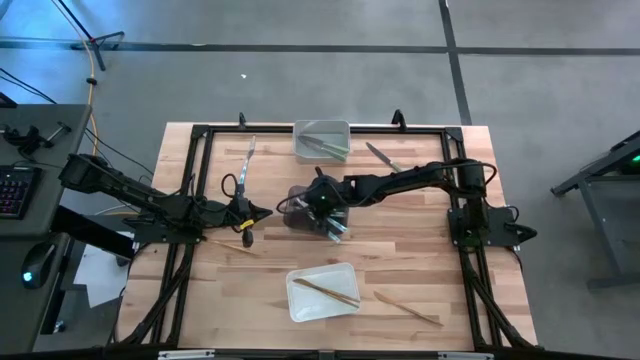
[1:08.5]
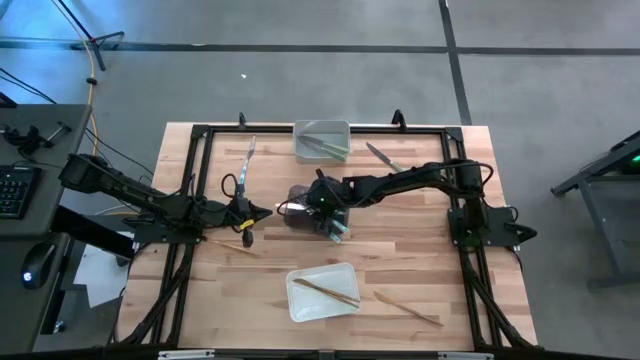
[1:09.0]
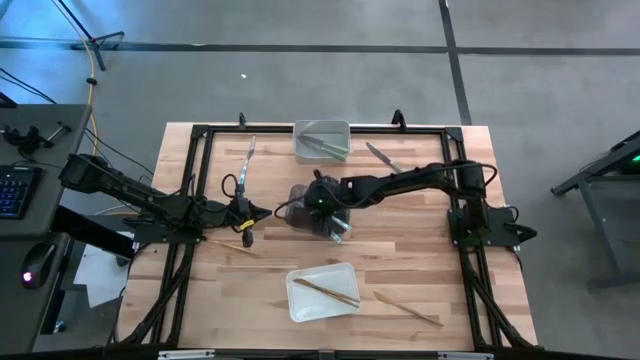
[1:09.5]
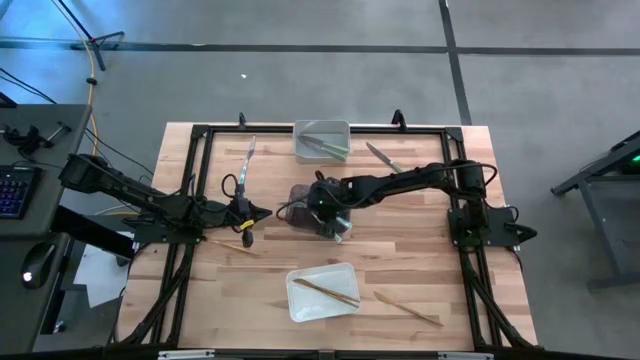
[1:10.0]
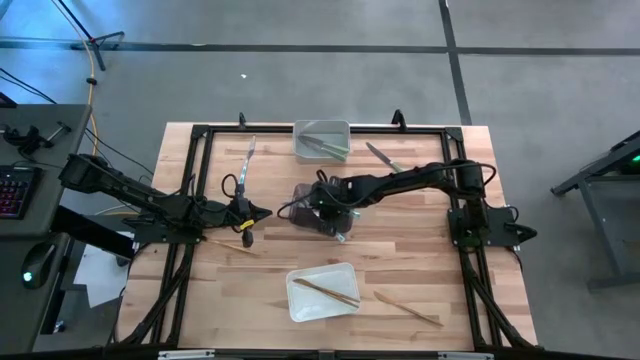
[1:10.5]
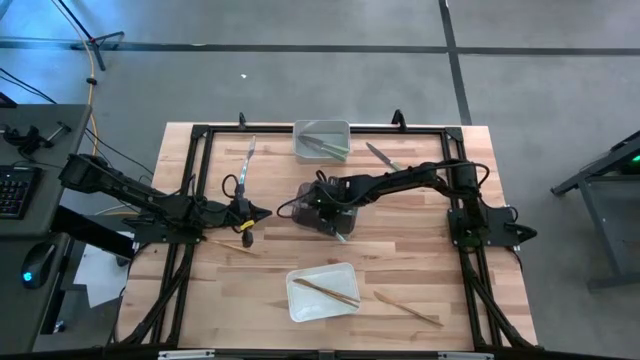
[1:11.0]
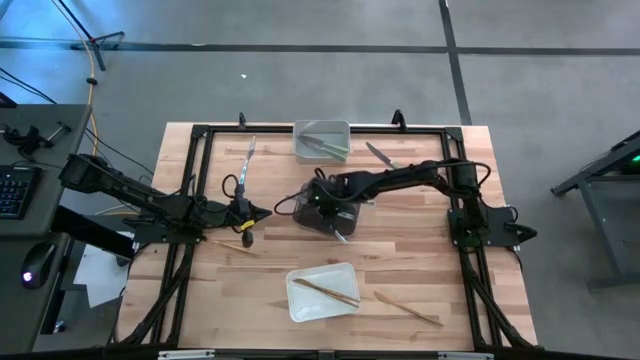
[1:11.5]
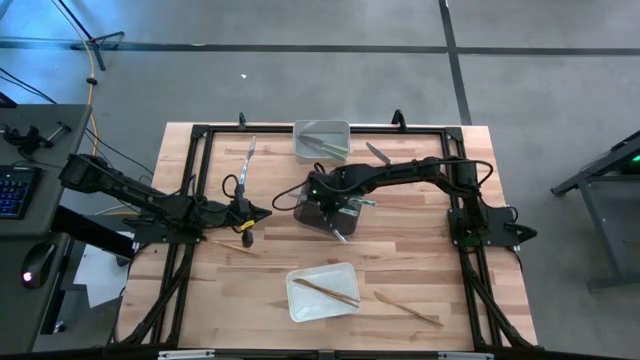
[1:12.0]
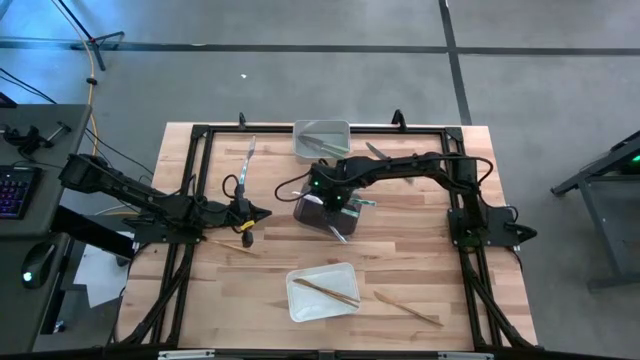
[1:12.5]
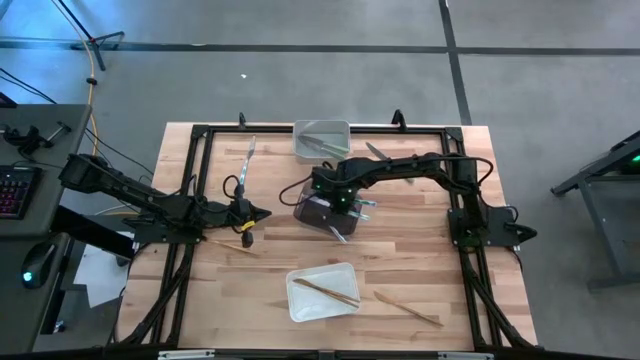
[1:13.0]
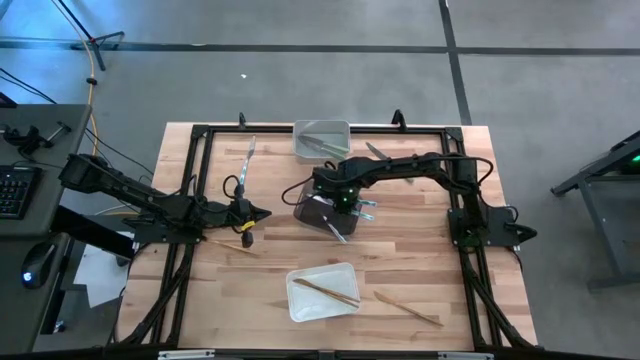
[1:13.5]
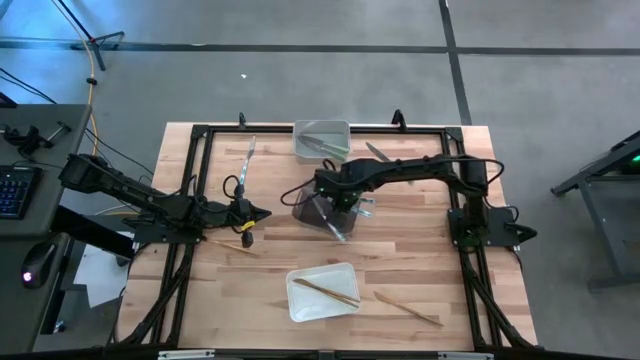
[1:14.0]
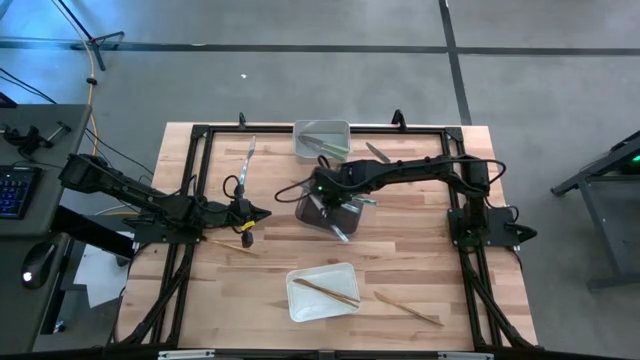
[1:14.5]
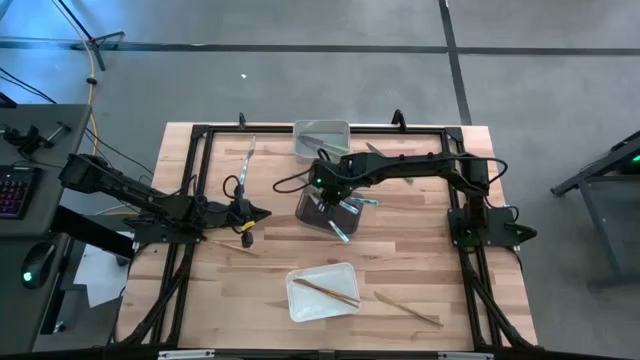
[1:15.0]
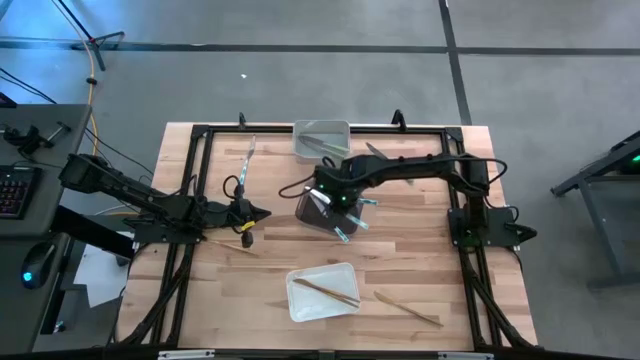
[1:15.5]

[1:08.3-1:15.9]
Task: Sort silverware by color (type)
Put the blue patterned table knife into the black bin

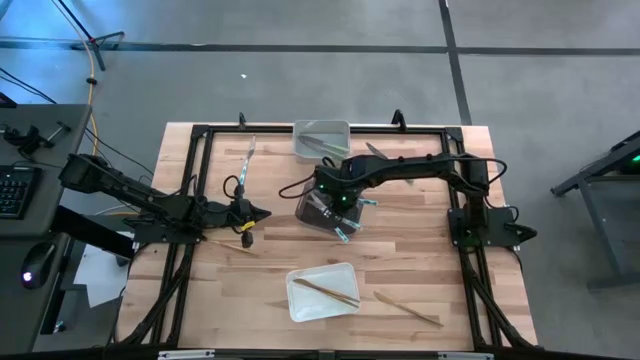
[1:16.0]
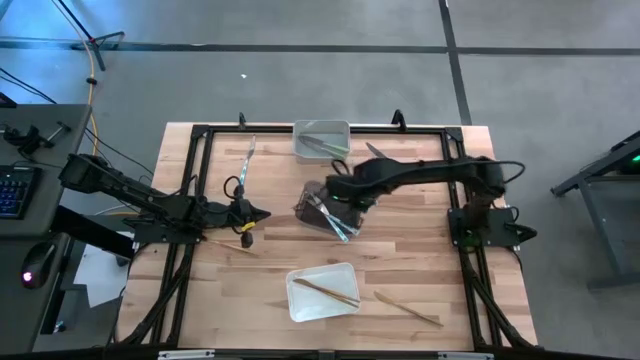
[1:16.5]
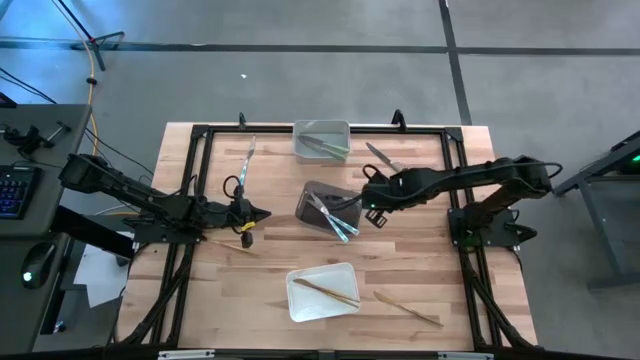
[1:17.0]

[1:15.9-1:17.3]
Adjust the blue patterned table knife in the black bin

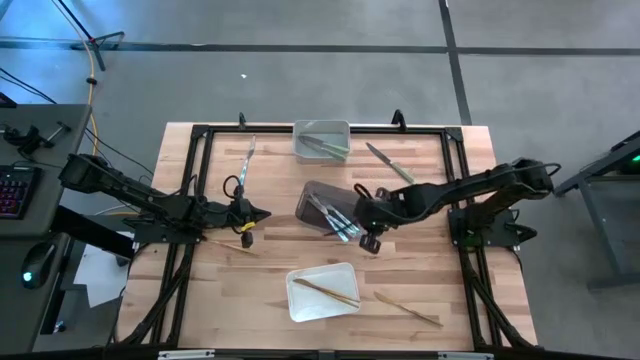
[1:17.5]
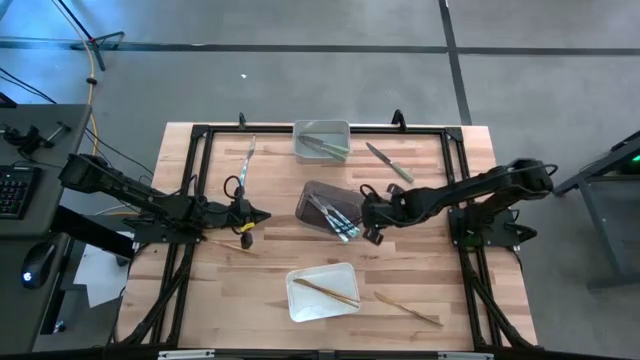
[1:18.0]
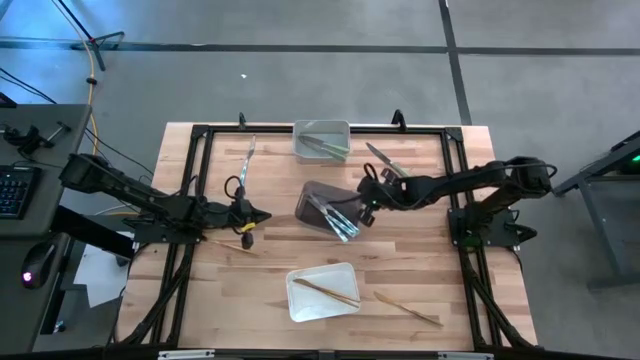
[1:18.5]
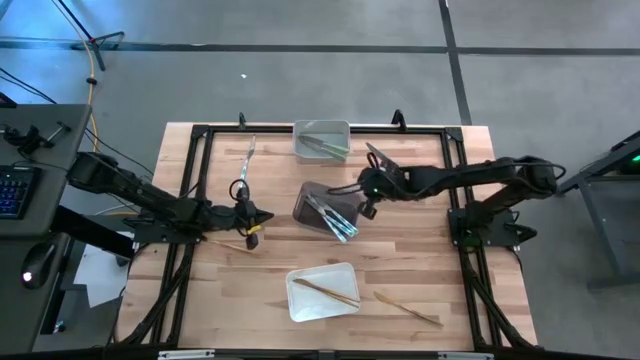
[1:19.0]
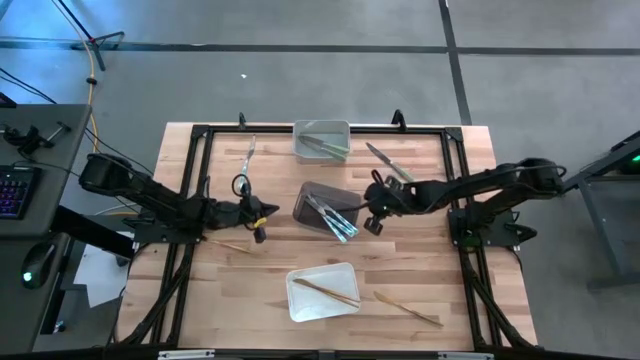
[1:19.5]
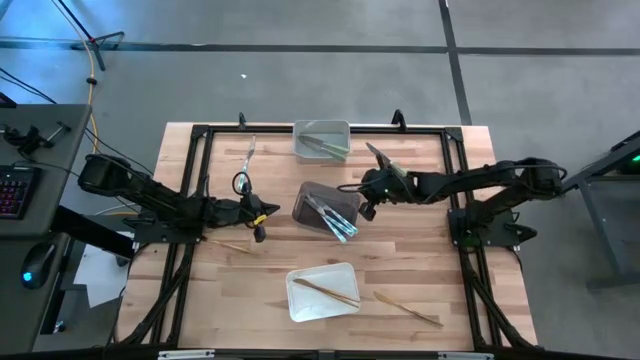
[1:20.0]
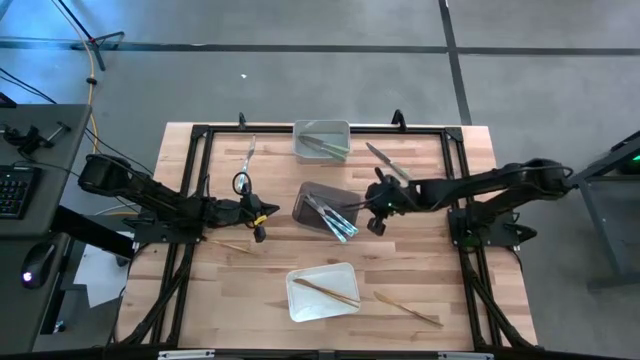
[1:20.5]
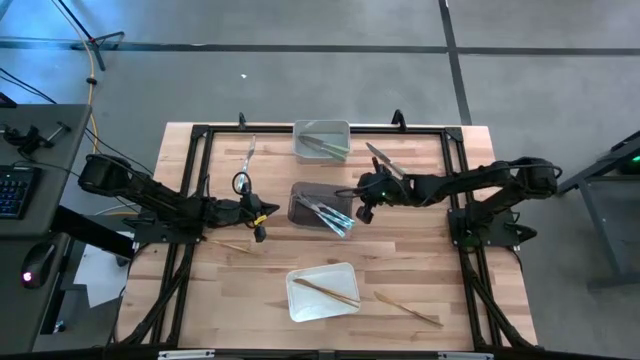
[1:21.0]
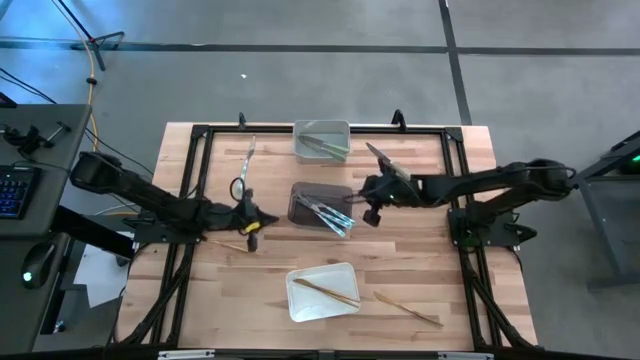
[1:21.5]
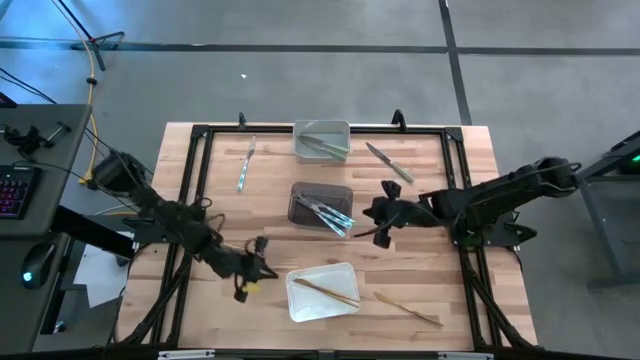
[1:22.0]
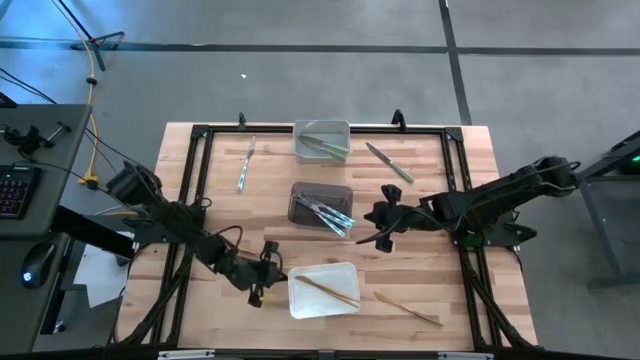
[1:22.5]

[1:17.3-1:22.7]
Adjust the bins

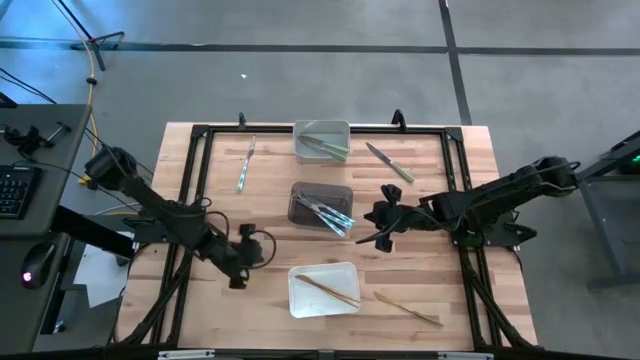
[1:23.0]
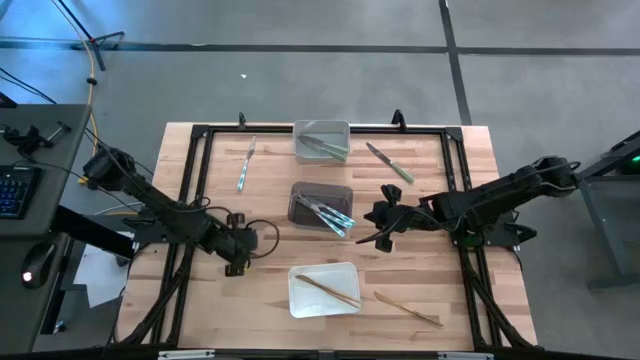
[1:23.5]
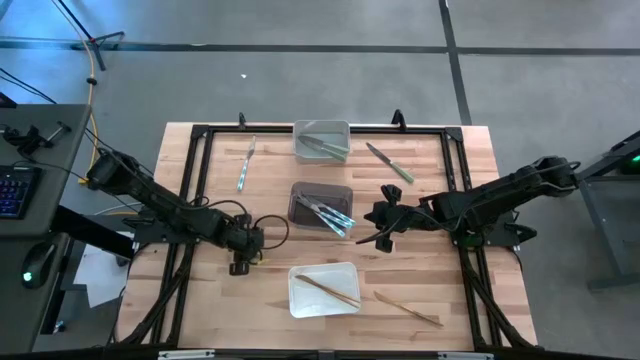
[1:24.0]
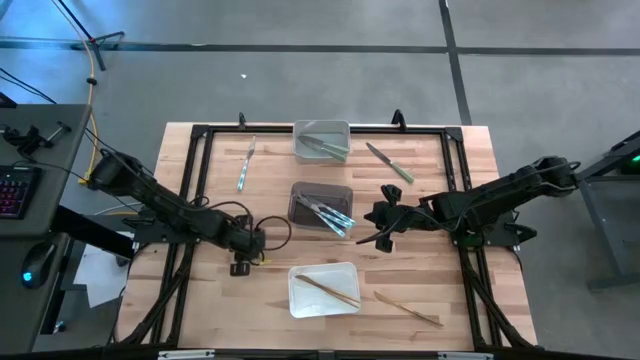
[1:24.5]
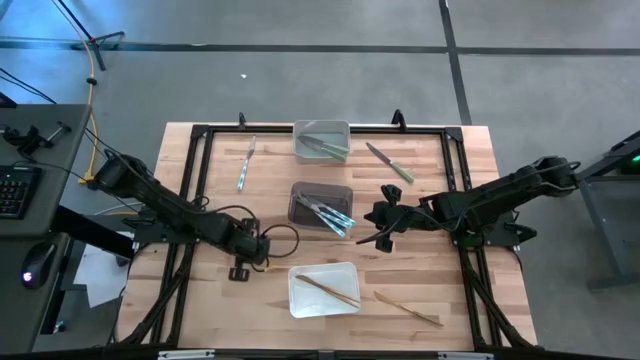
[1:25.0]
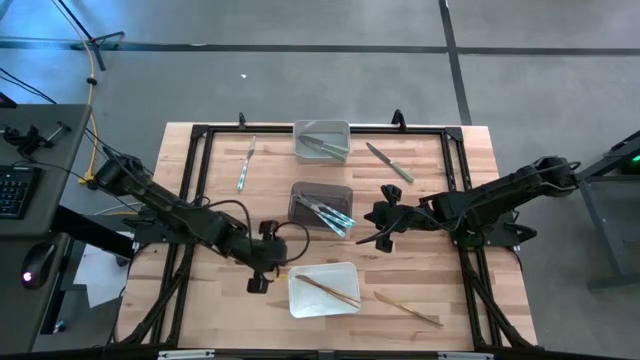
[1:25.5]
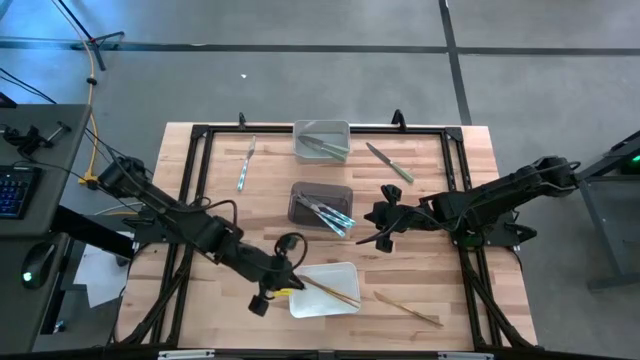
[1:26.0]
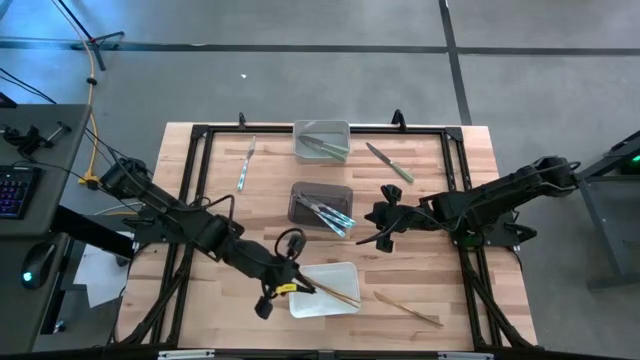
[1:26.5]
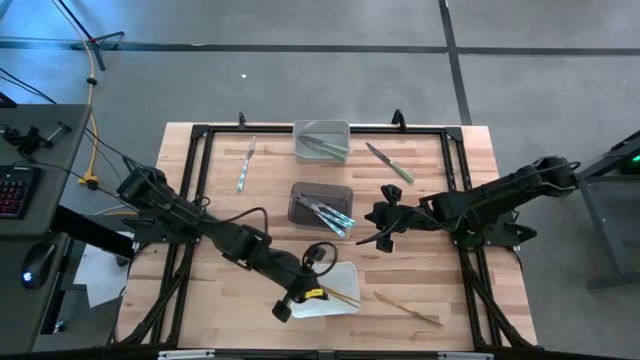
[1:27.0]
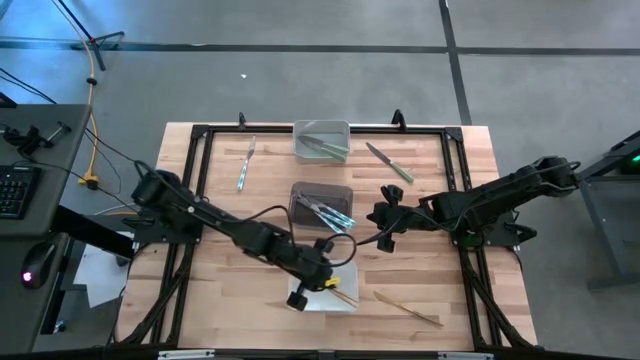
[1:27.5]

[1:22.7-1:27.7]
Put the gold table knife into the white bin

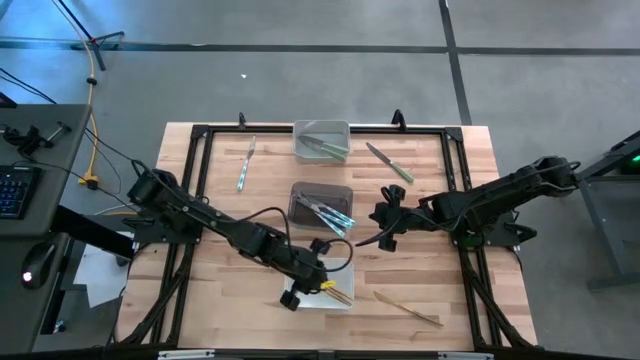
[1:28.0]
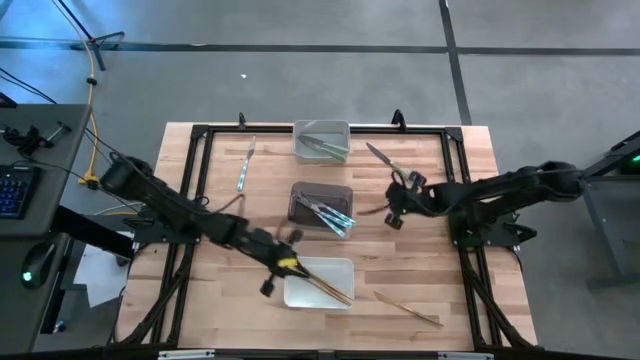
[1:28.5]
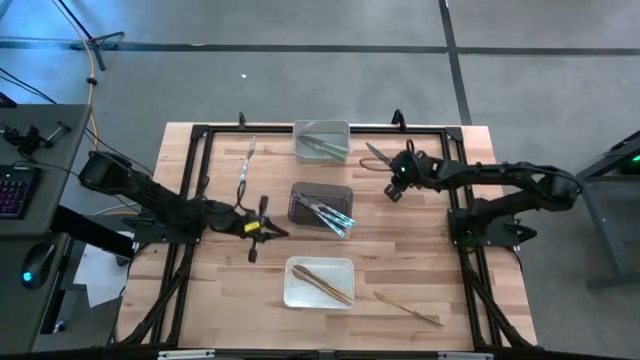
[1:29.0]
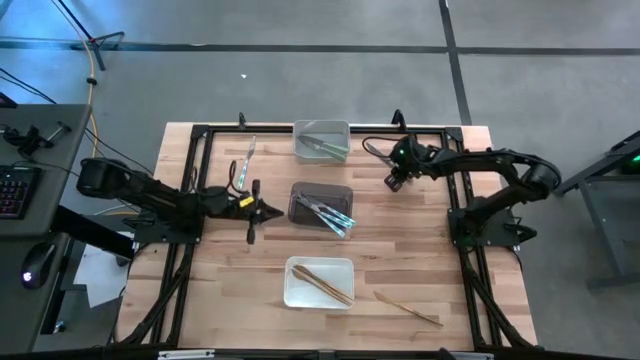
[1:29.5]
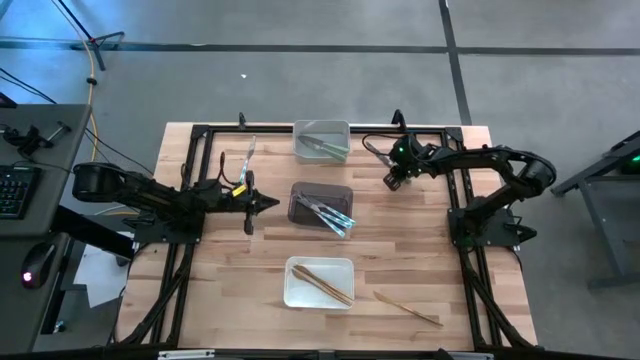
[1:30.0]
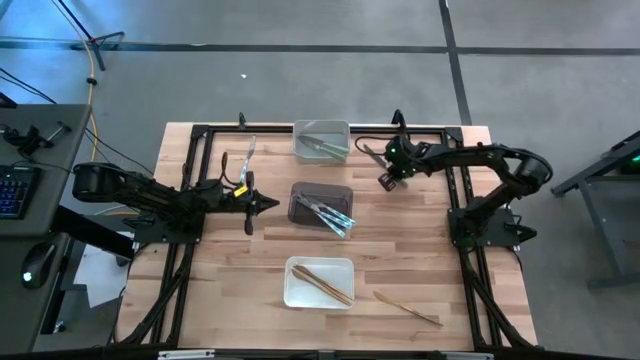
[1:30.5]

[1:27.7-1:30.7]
Put the green table knife into the gray bin
